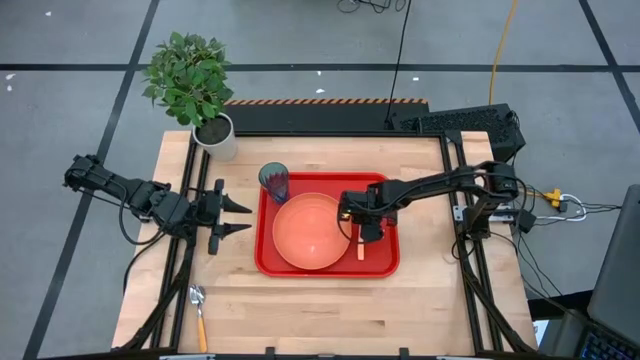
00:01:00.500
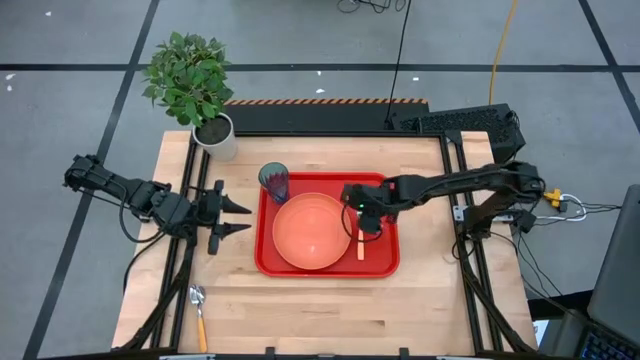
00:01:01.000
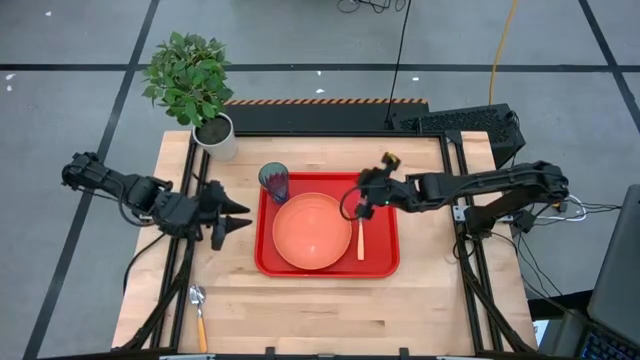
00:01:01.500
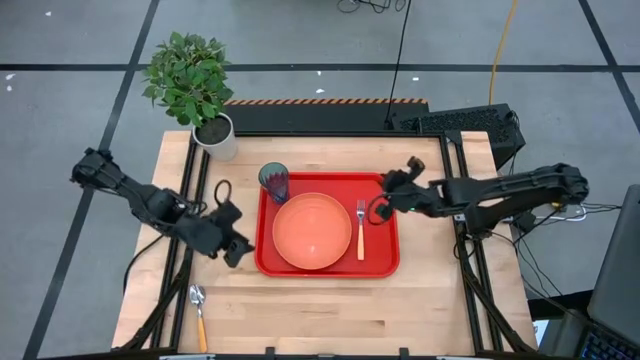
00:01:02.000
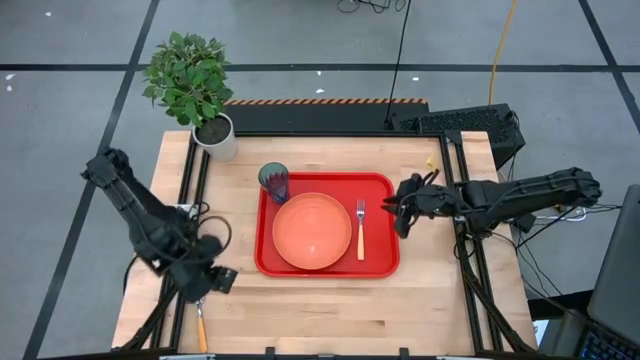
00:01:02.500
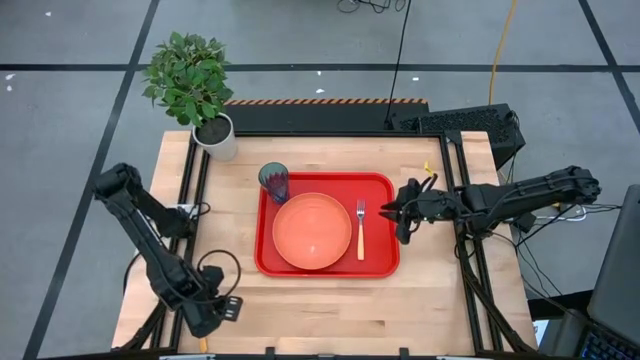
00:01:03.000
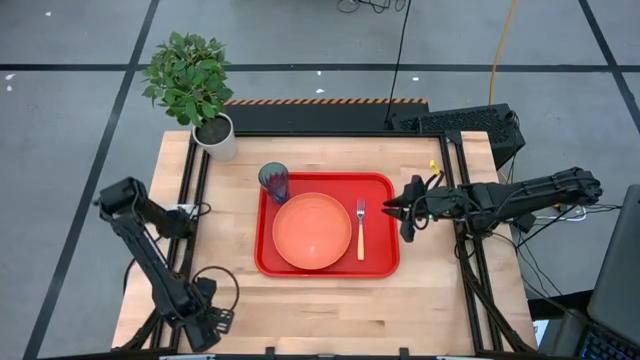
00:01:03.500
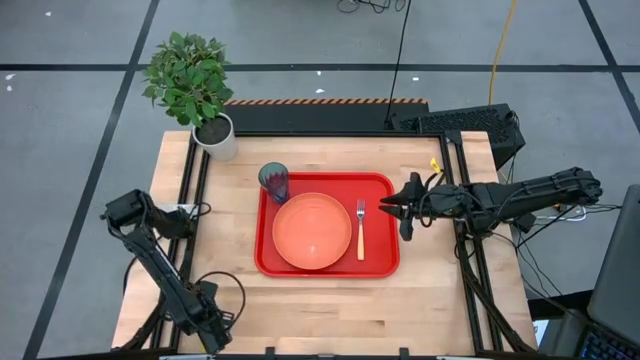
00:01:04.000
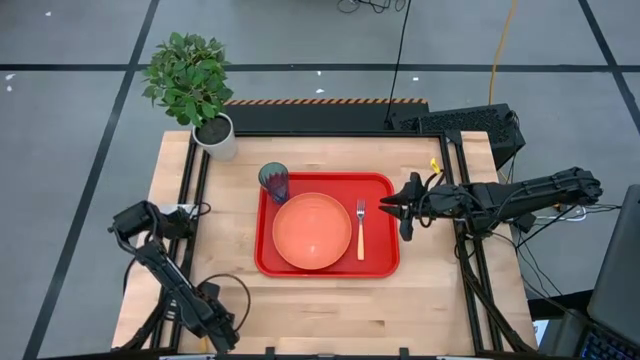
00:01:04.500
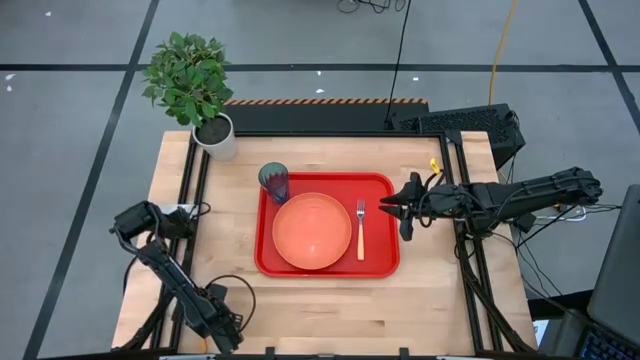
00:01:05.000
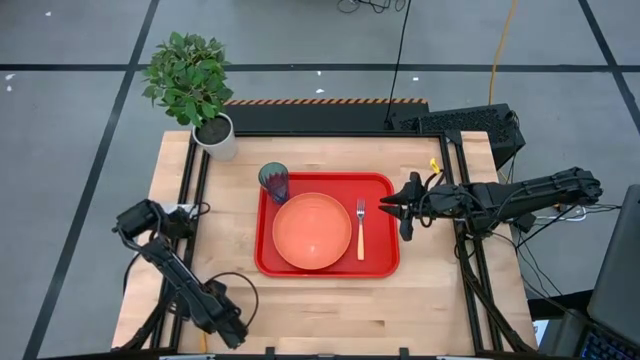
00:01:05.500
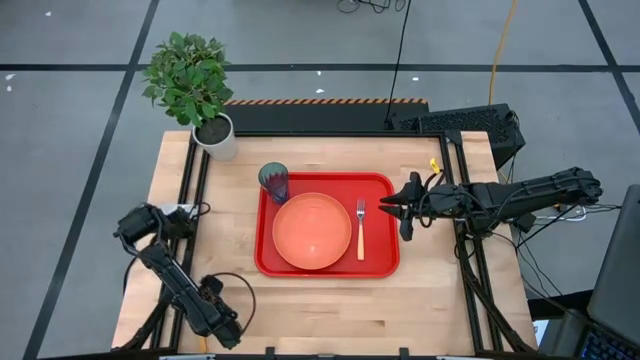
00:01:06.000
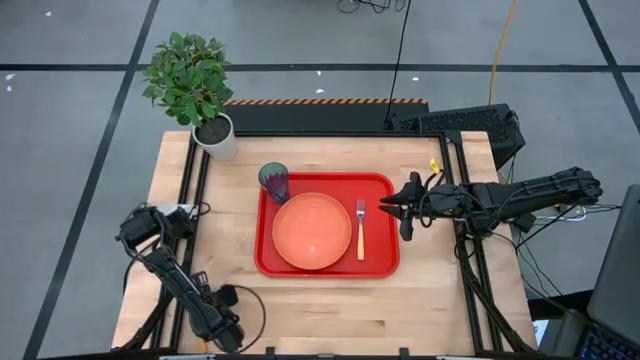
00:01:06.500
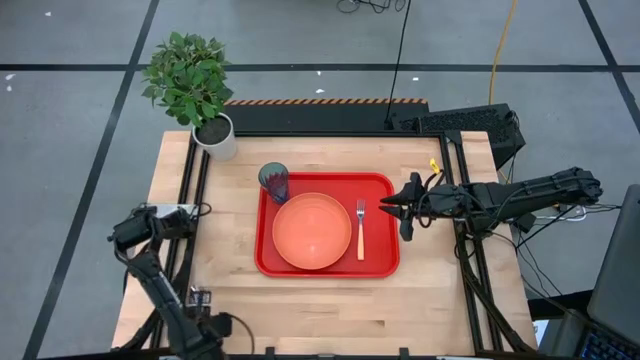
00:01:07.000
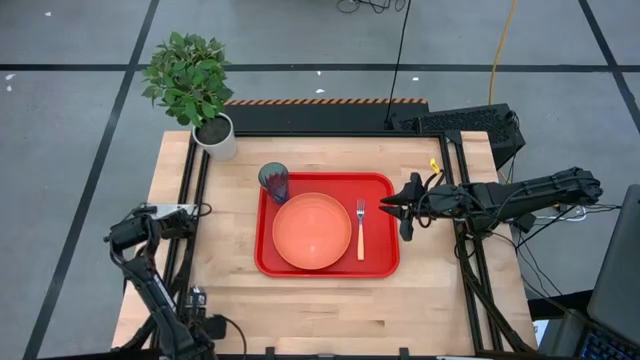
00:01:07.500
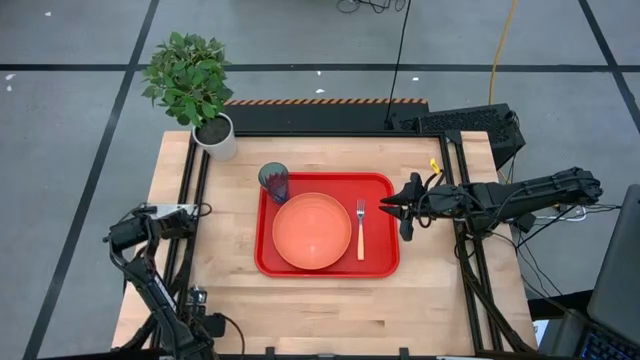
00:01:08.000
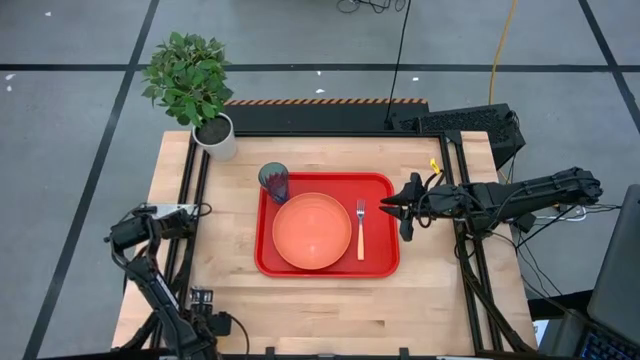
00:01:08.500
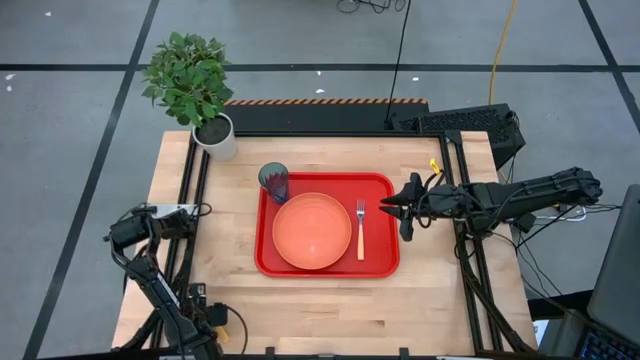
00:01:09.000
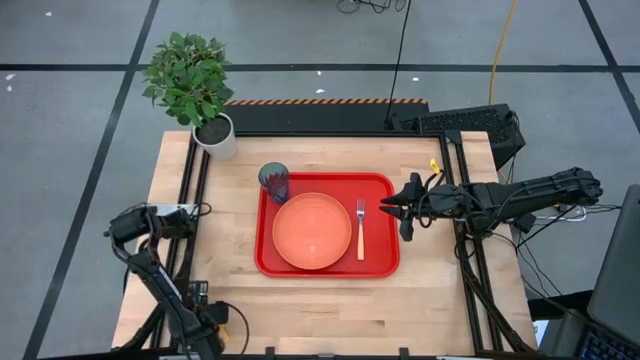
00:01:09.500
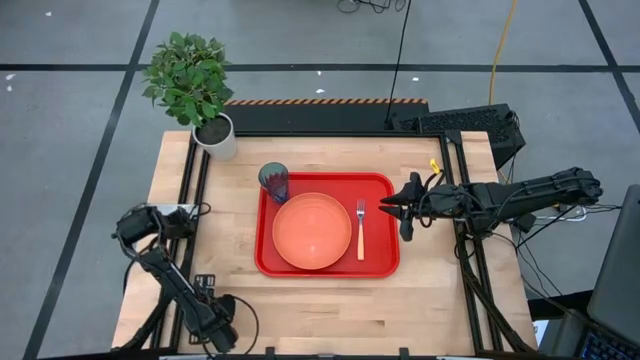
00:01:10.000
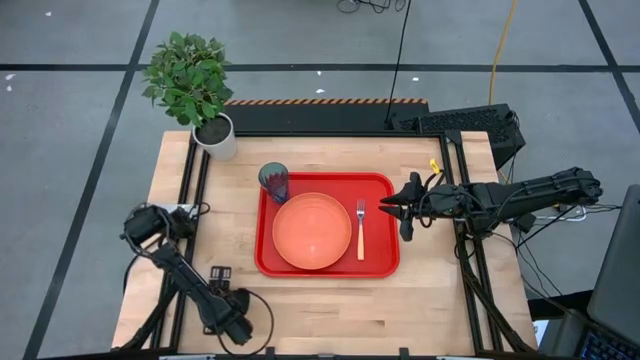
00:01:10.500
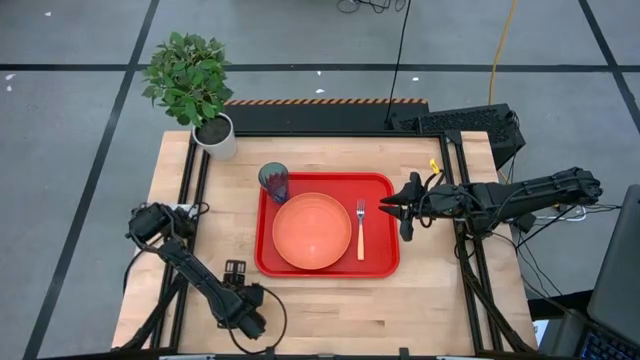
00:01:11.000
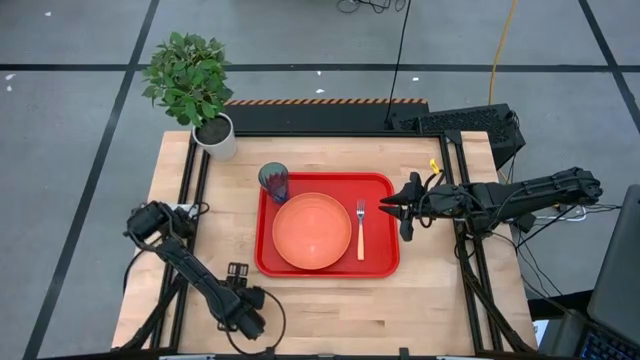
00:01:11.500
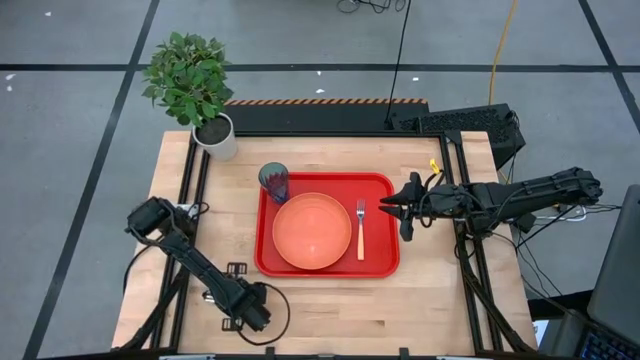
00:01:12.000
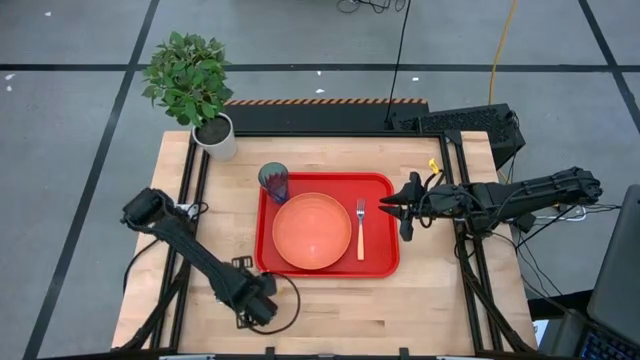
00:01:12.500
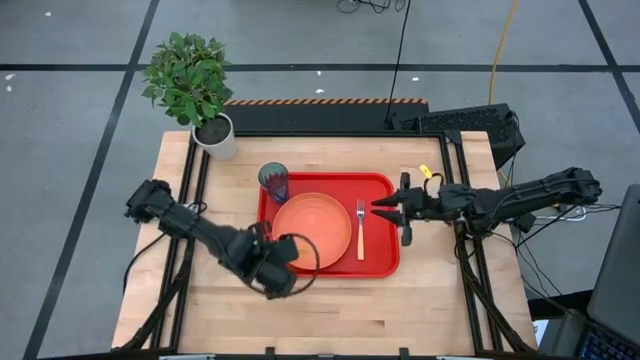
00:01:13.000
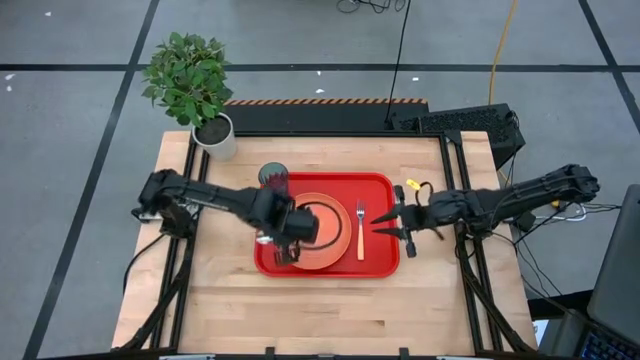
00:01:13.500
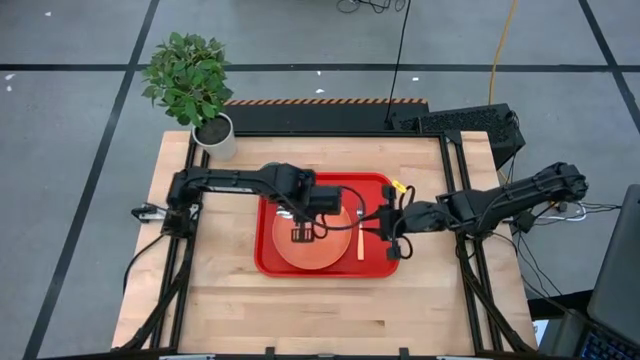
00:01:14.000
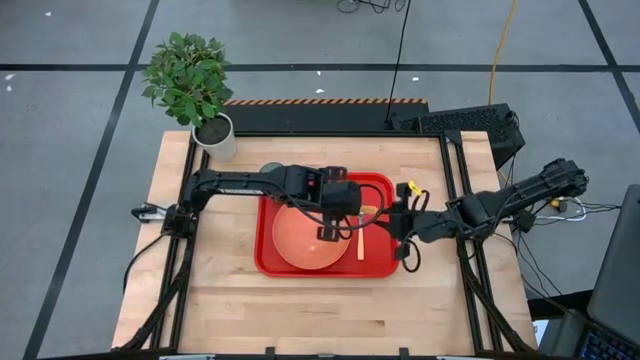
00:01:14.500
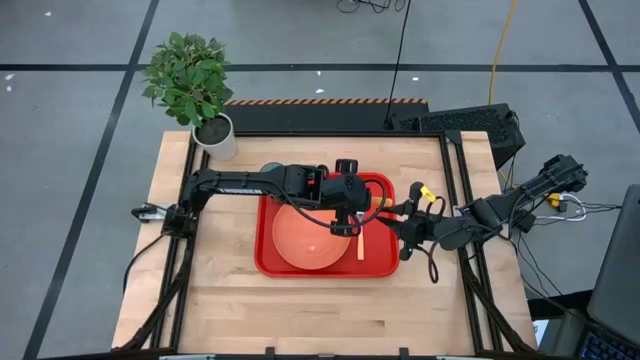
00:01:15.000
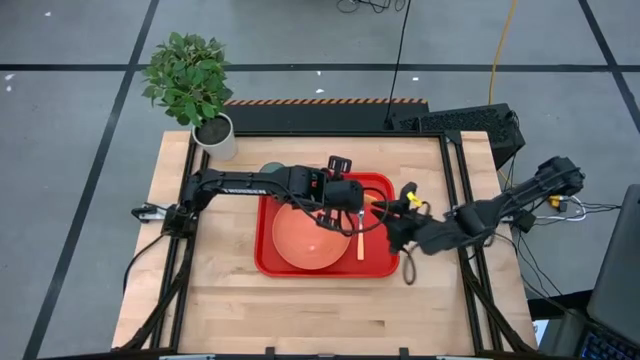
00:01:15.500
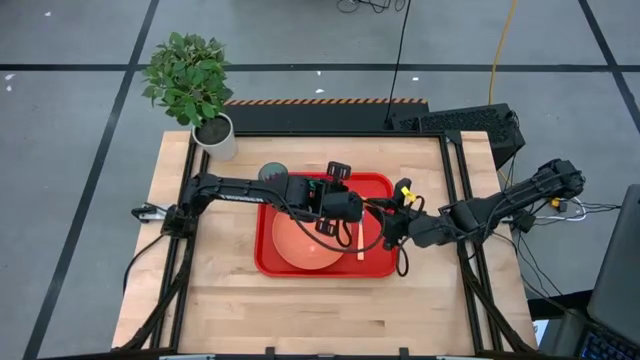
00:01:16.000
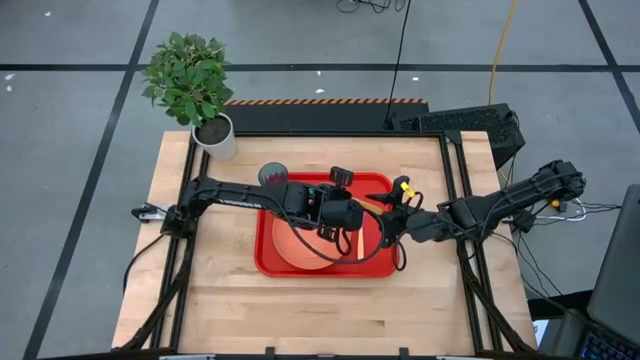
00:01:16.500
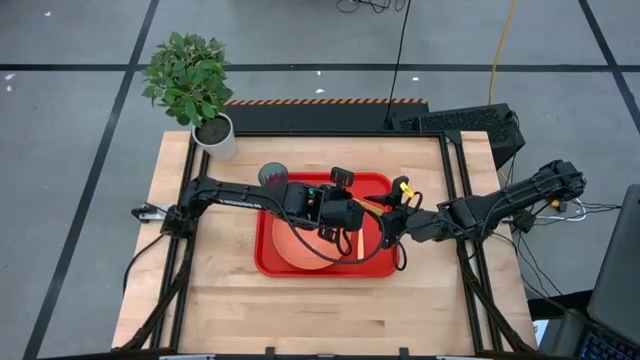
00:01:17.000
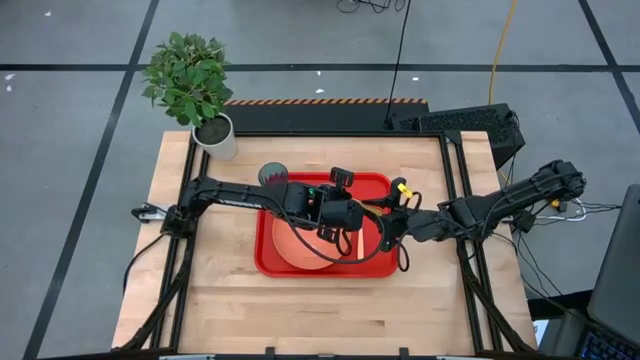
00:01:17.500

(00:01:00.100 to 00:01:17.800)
Task: Pick and place plate/cup/fork/spoon on tray
Put the orange spoon on the red serving tray to the right of the yellow fork

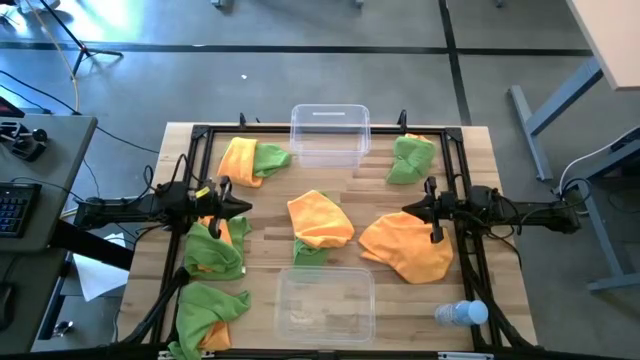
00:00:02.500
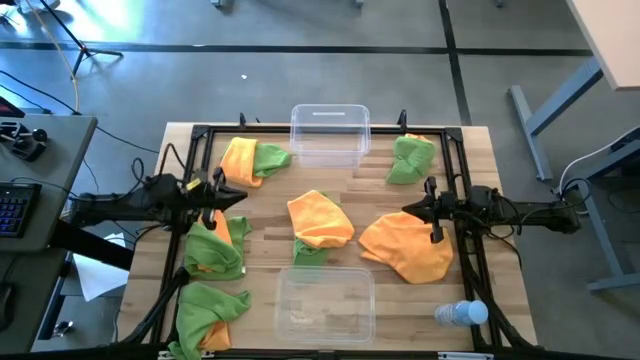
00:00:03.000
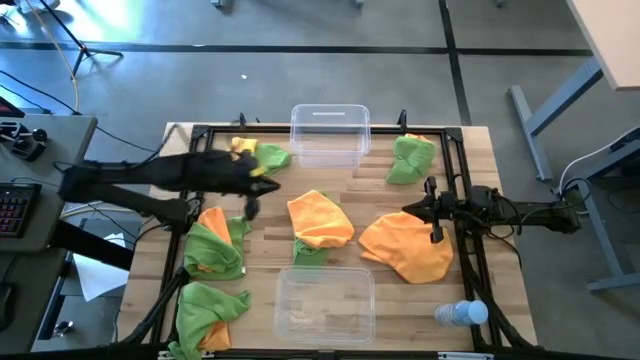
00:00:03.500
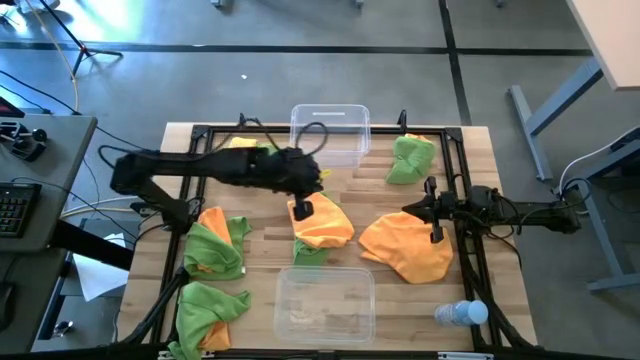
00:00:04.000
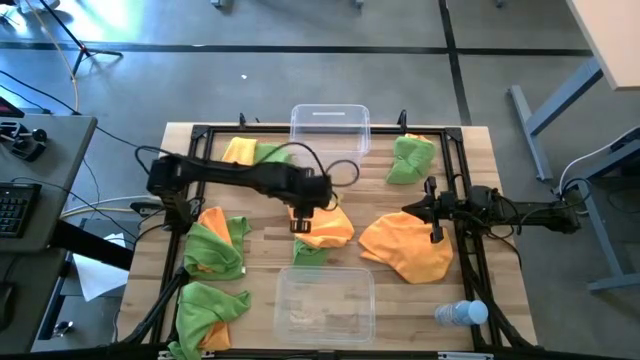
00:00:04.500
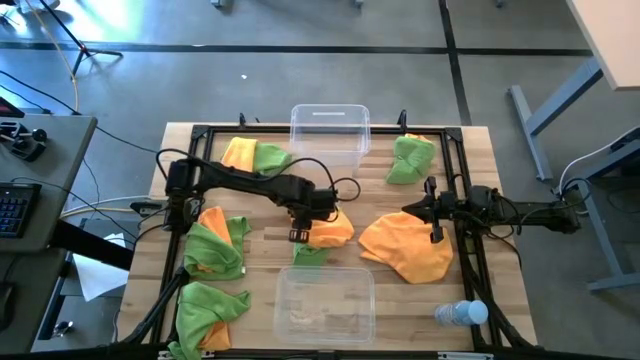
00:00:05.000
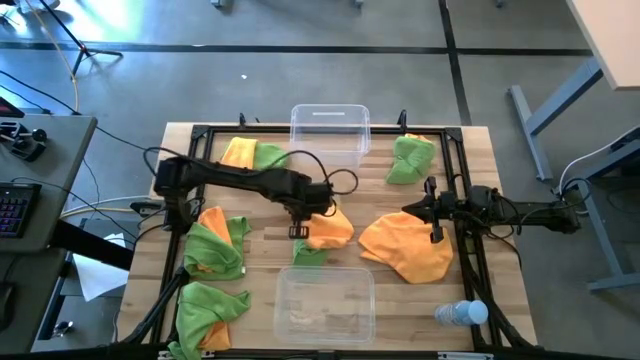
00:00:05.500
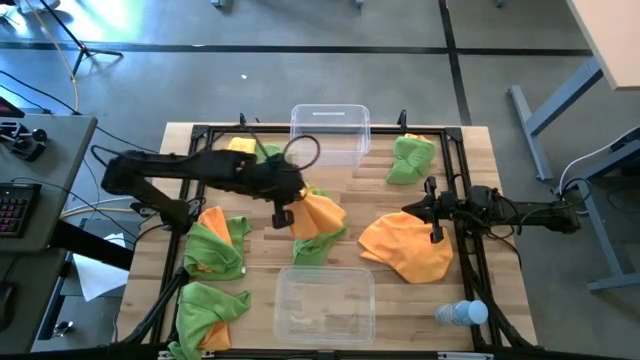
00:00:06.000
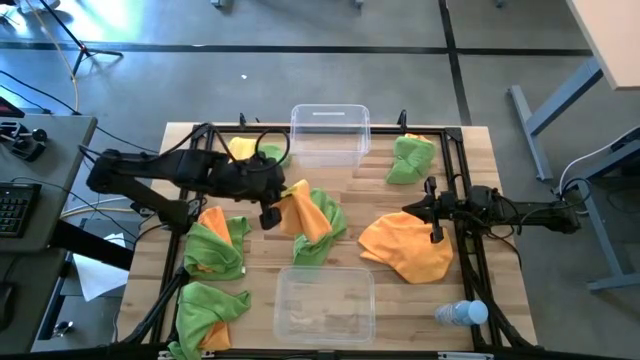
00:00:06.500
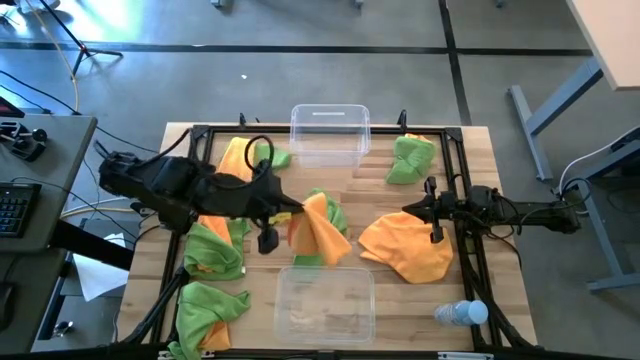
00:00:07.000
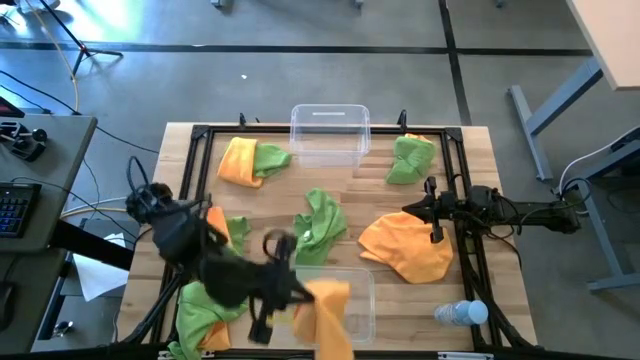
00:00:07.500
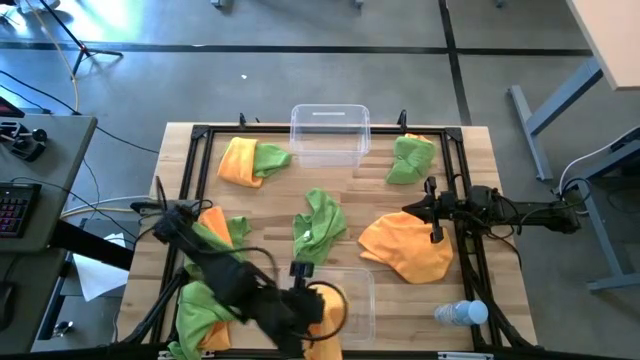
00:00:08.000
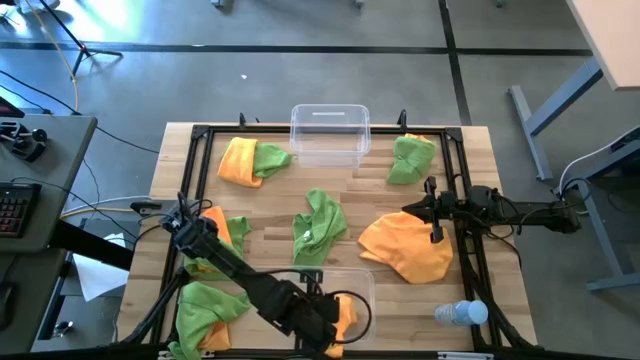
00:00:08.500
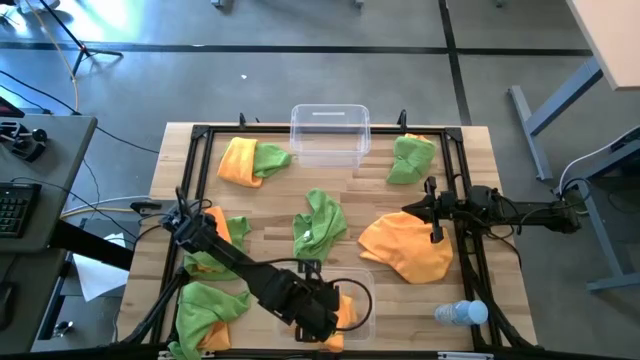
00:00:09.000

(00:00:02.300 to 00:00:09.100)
Task: Sort microfiber towel by color & place in baskets
Put the yellow towel into the bottom transparent bin
